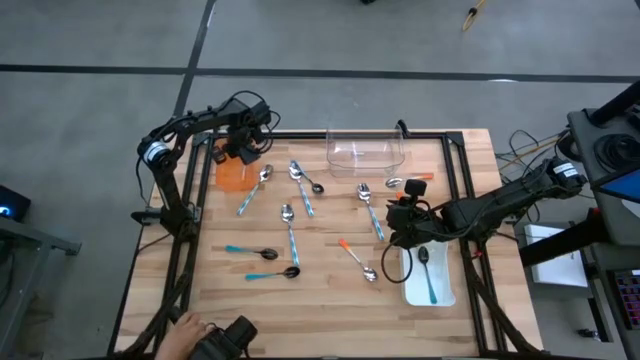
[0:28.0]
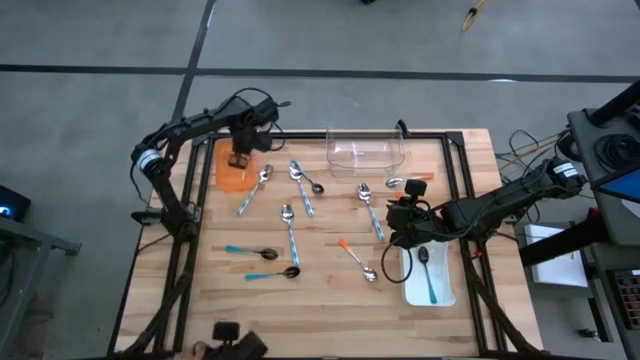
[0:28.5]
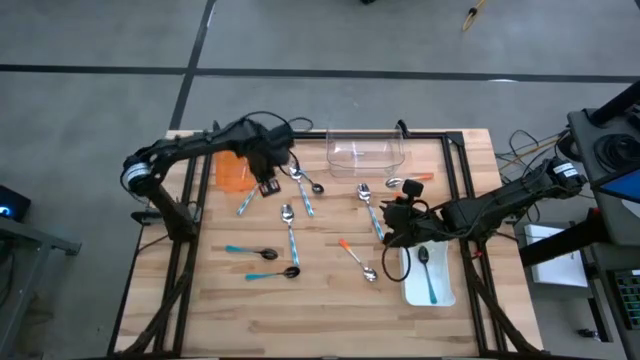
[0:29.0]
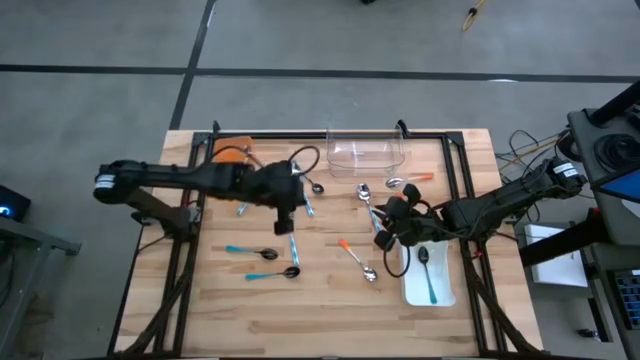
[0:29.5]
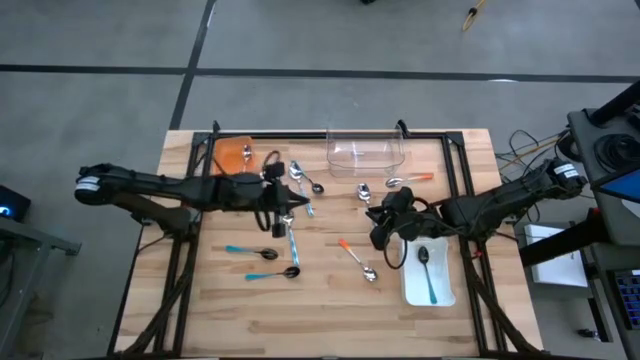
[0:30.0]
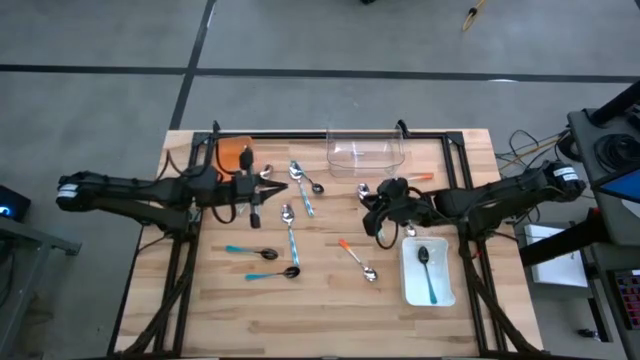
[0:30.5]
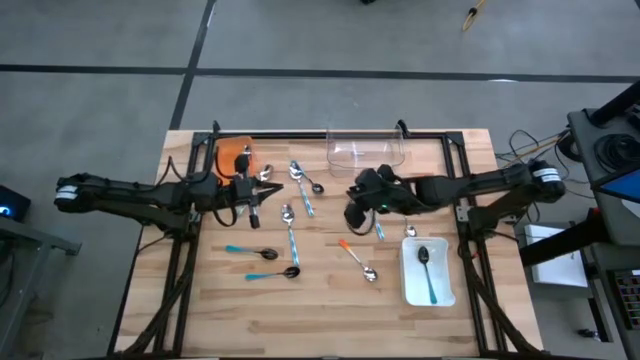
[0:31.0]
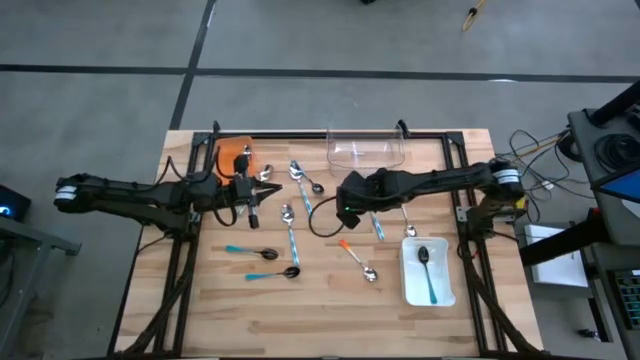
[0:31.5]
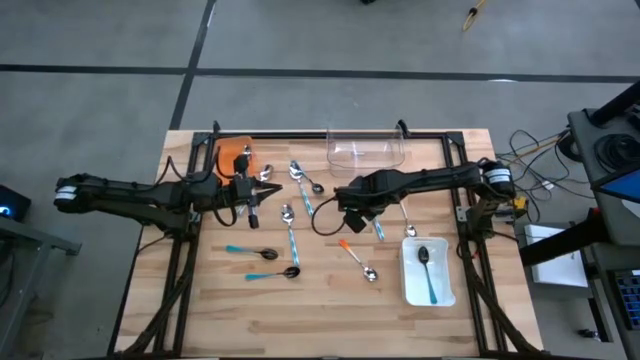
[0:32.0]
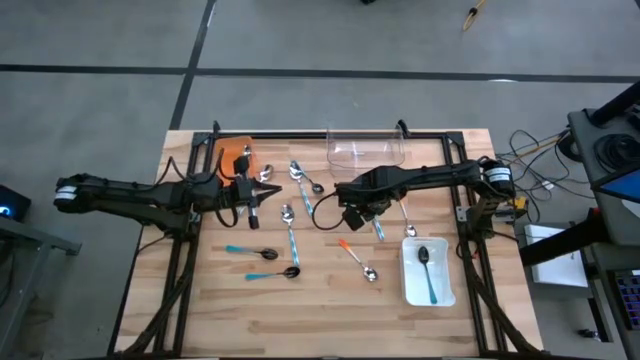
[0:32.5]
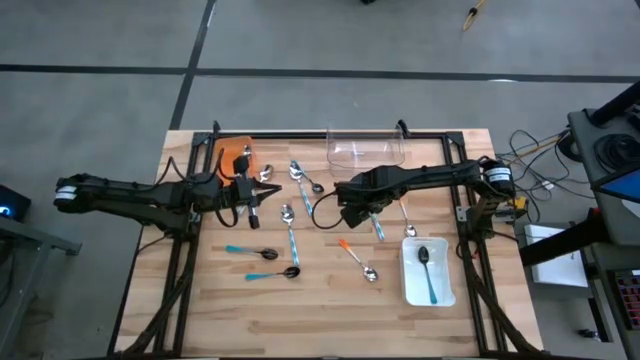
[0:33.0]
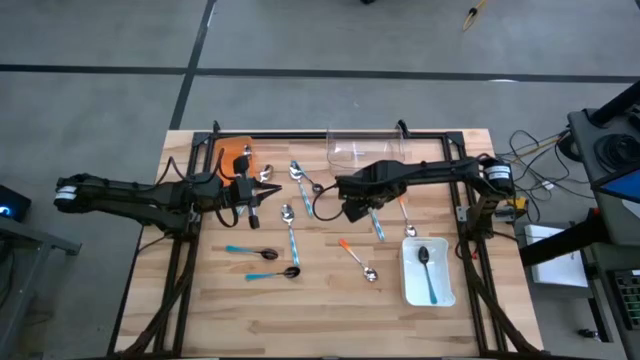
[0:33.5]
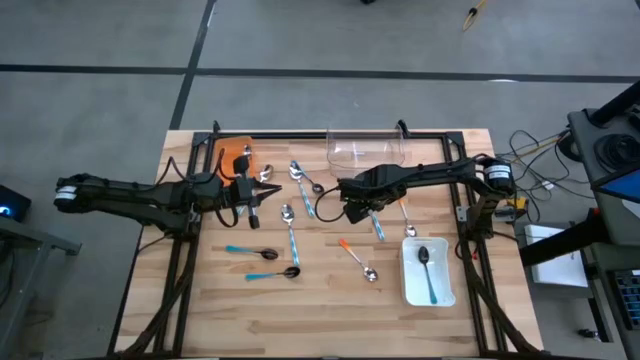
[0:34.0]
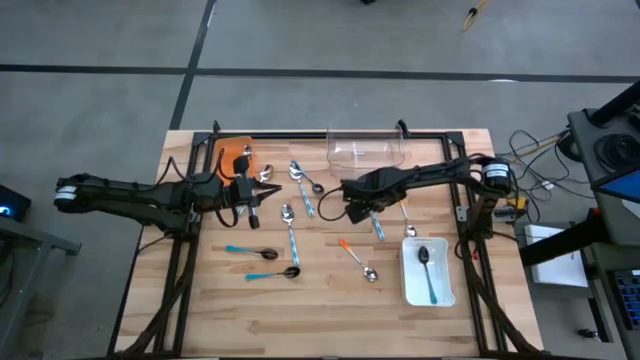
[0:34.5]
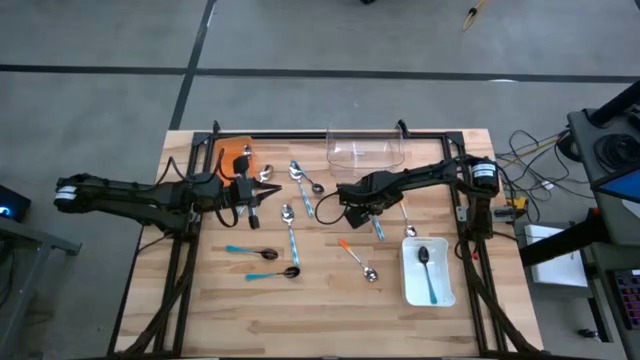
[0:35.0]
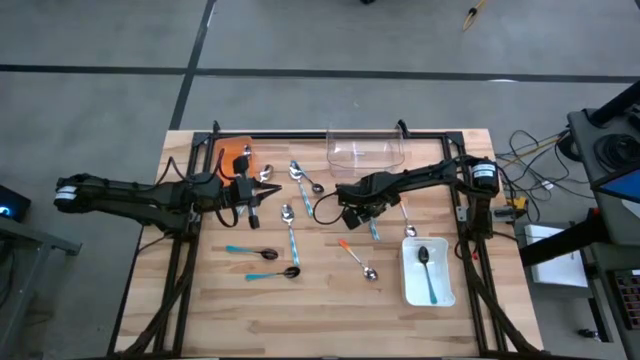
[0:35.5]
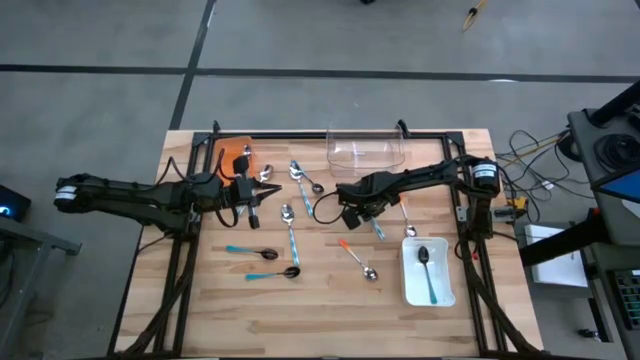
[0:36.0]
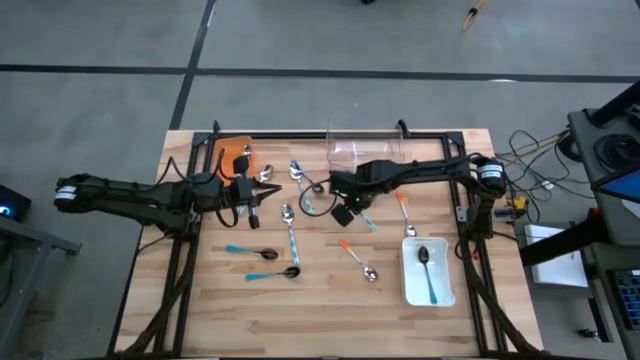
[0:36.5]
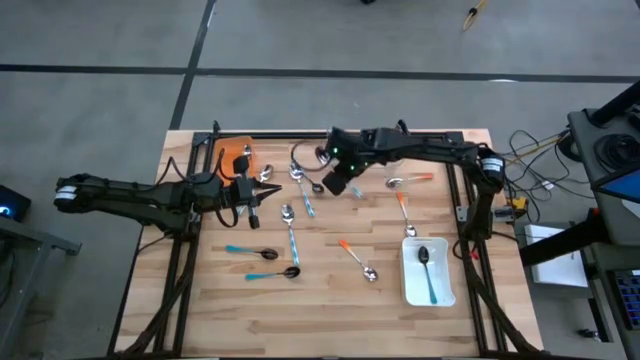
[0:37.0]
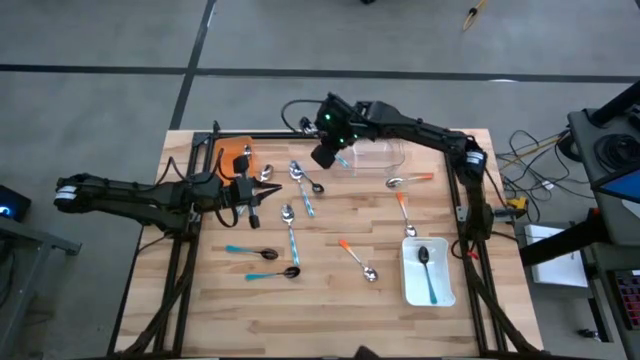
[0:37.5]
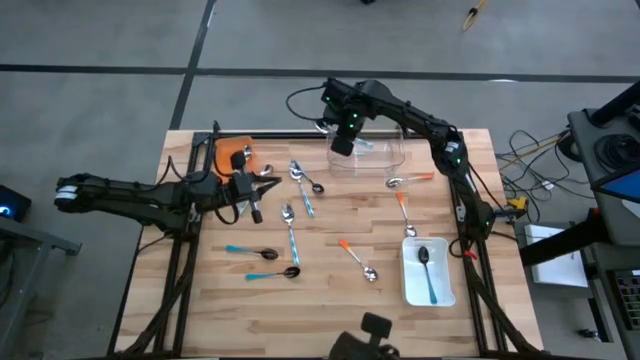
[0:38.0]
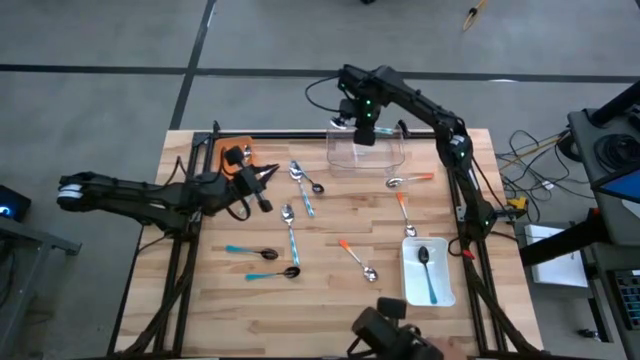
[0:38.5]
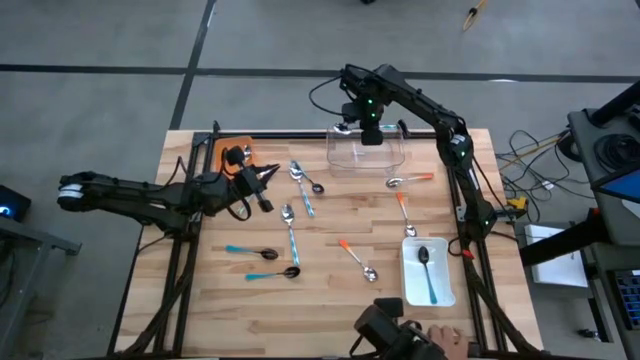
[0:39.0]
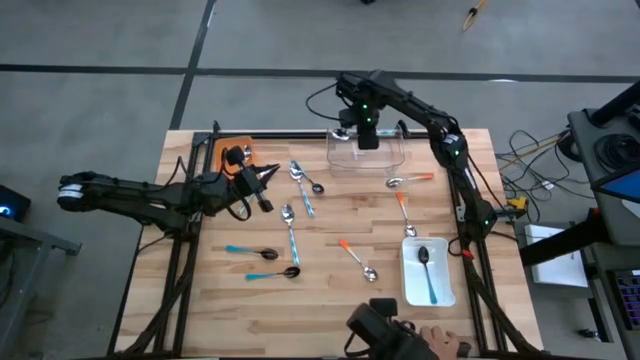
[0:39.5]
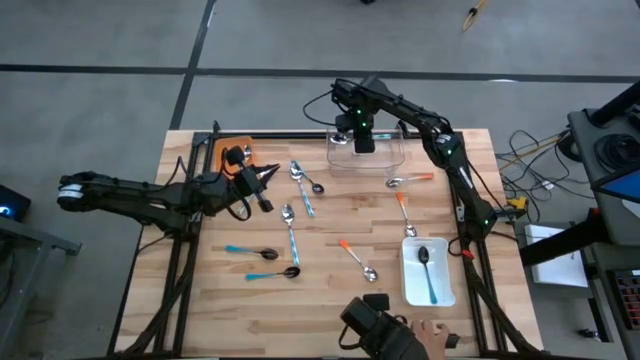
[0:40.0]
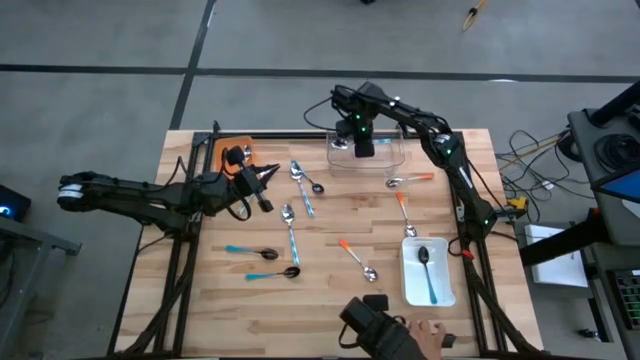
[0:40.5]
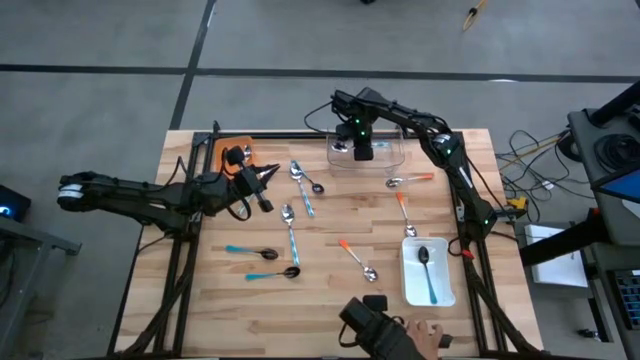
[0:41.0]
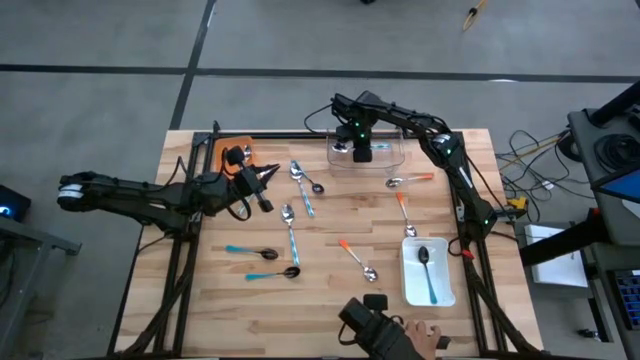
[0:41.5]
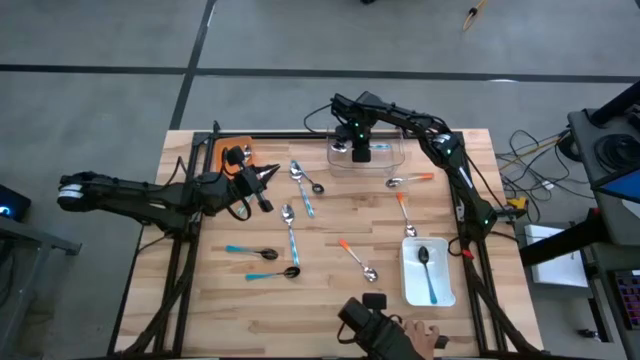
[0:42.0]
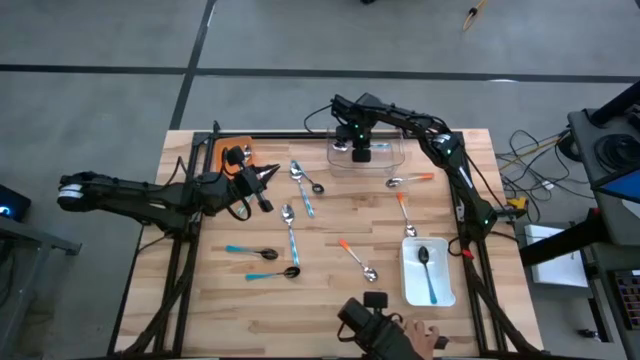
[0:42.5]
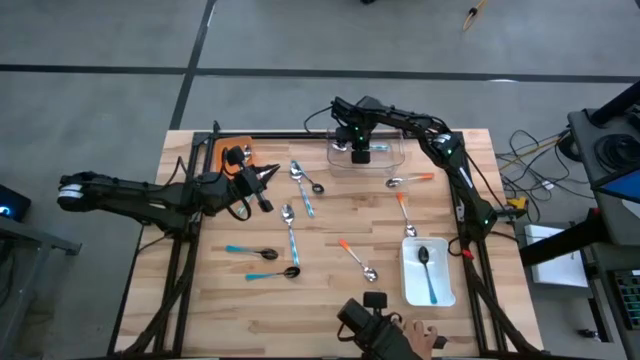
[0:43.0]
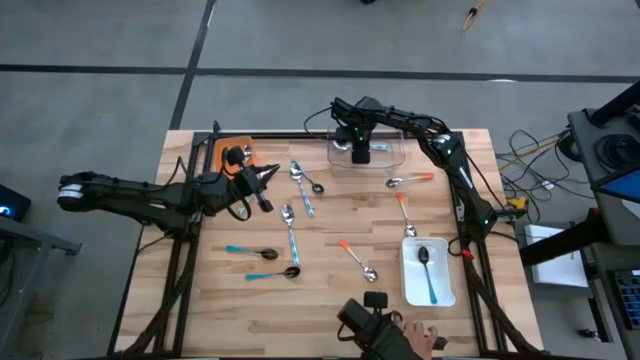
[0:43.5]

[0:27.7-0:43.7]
Task: Sort silverware by color (type)
Put the blue patterned spoon into the transparent bin

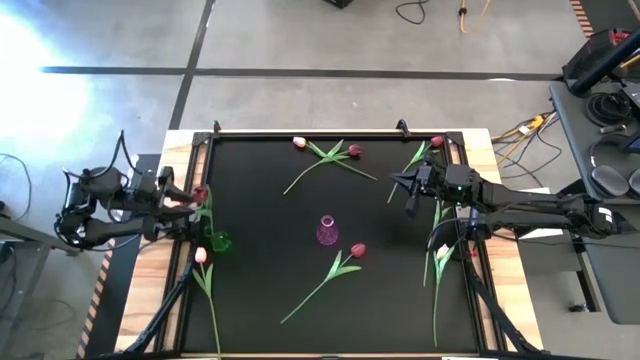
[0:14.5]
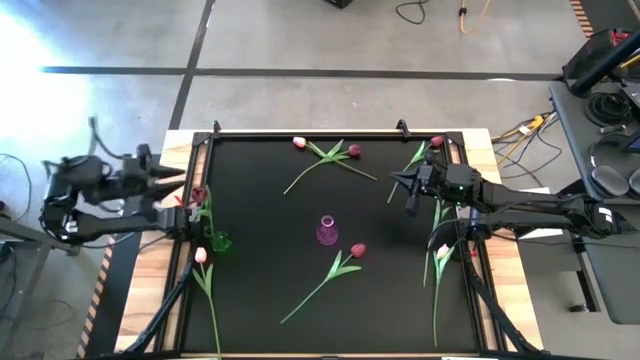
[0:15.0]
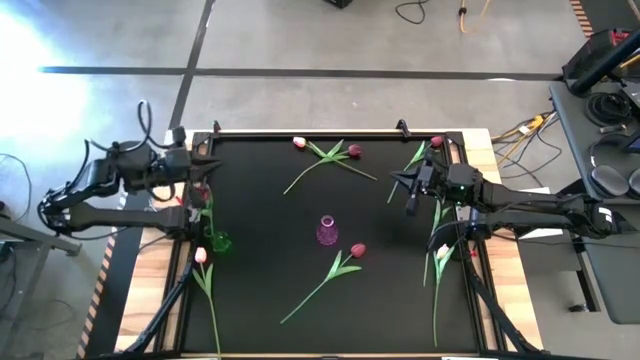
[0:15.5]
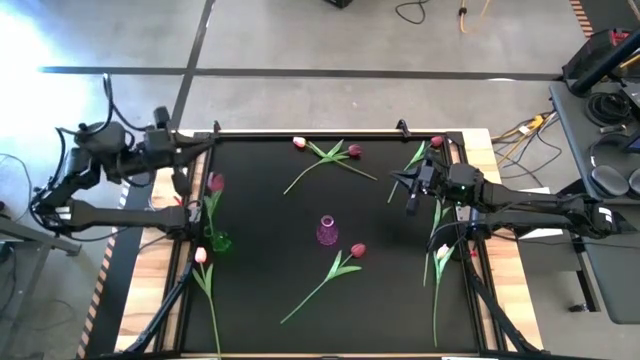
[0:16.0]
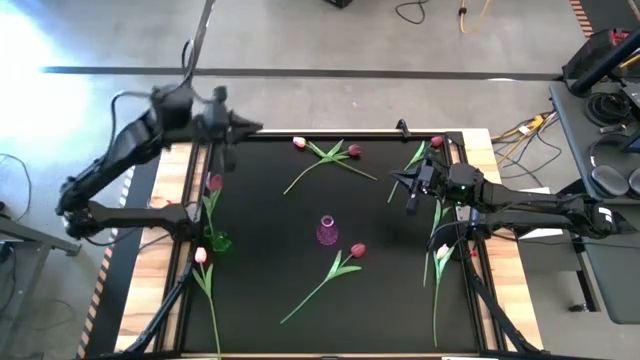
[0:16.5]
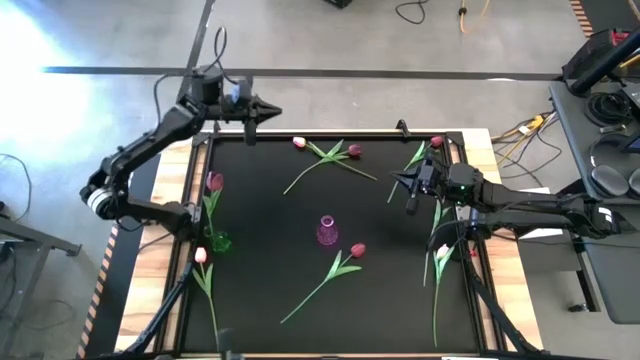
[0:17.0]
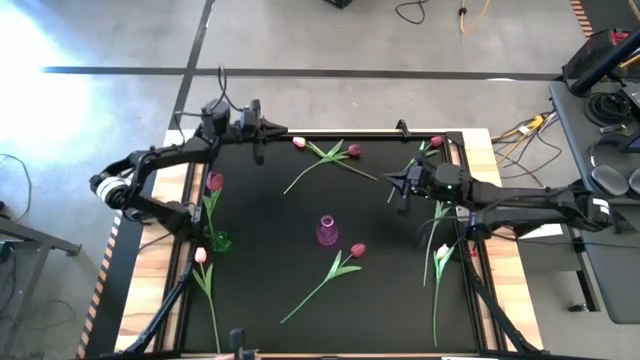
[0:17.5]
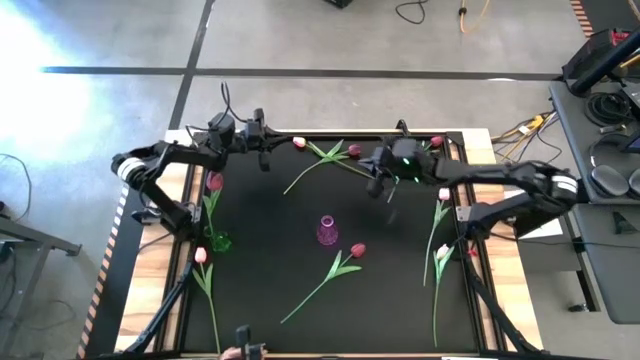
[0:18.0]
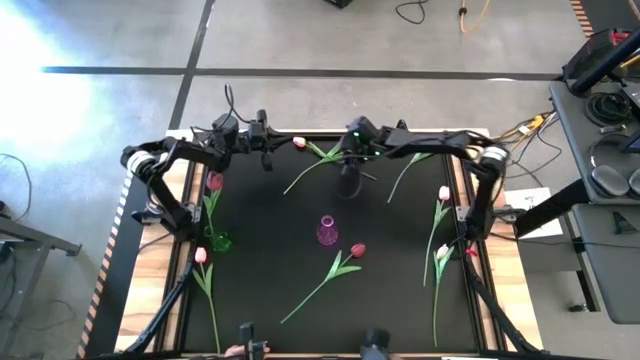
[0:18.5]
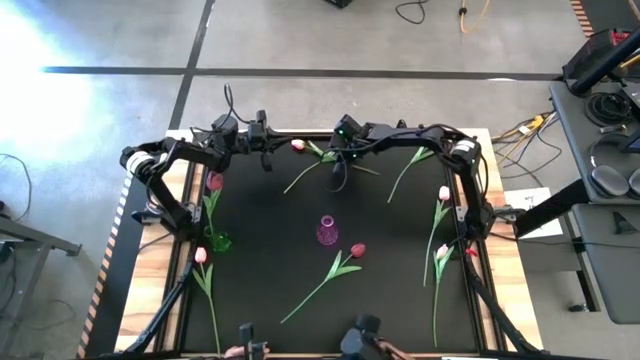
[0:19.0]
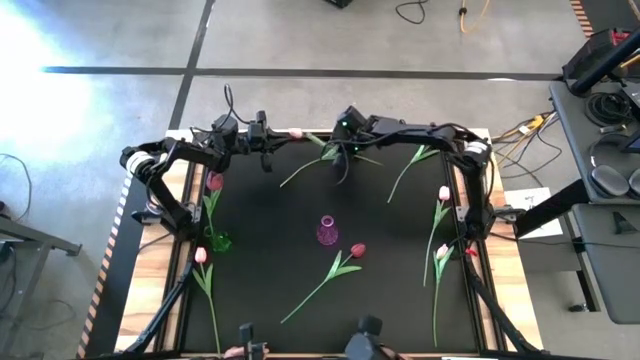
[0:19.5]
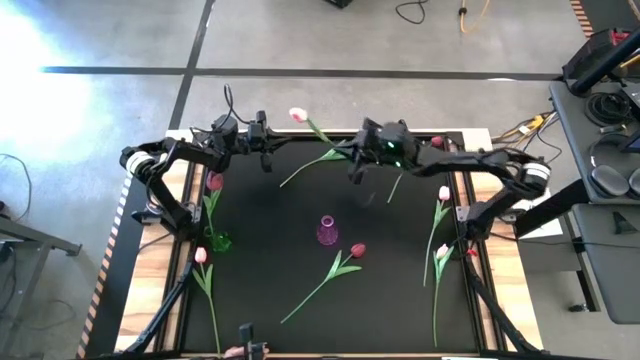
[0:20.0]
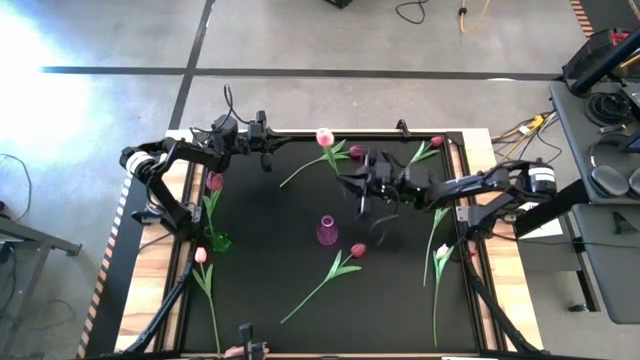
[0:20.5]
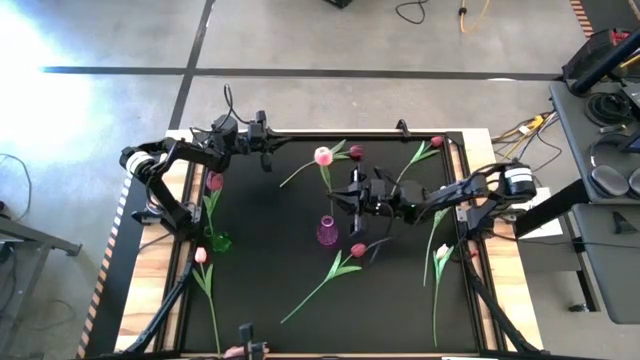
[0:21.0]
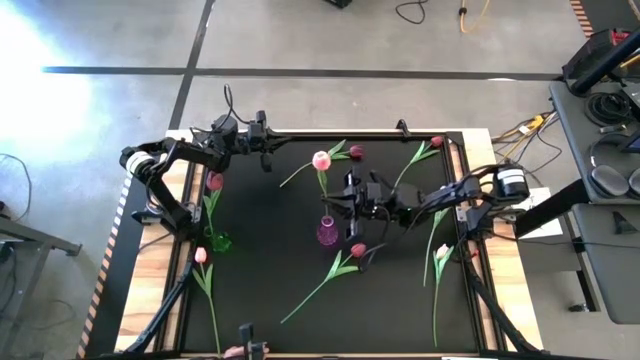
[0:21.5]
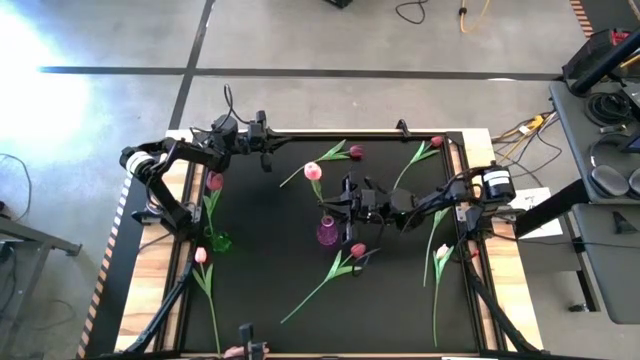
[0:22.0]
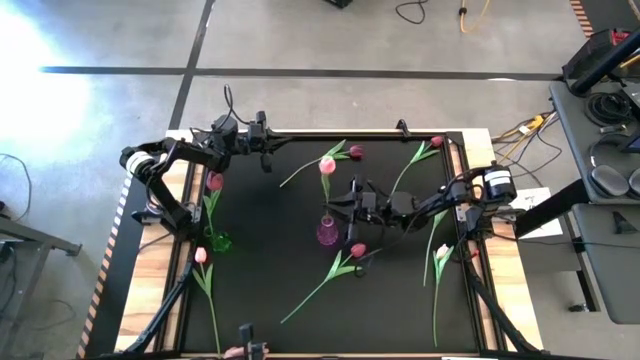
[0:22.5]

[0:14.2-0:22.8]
Task: Sort flowers into vase by color
Put the pink tulip into the purple vase
